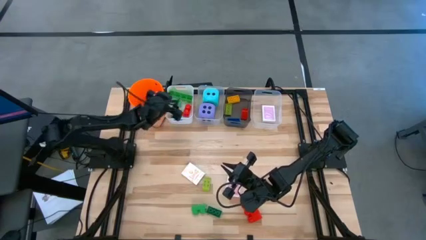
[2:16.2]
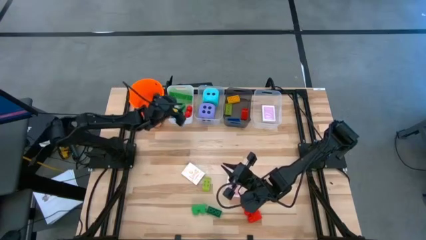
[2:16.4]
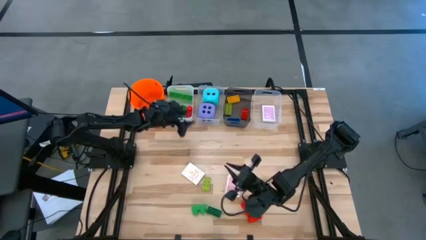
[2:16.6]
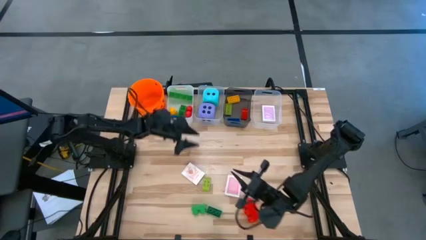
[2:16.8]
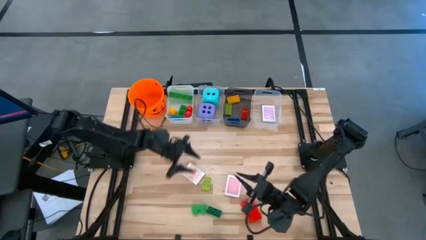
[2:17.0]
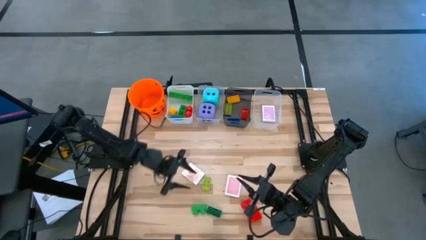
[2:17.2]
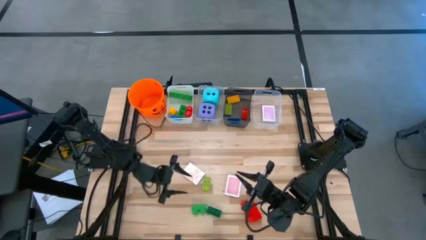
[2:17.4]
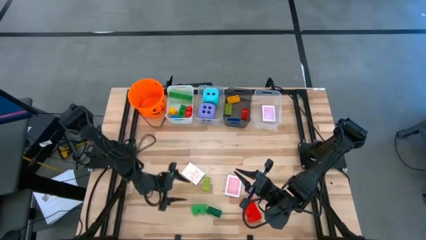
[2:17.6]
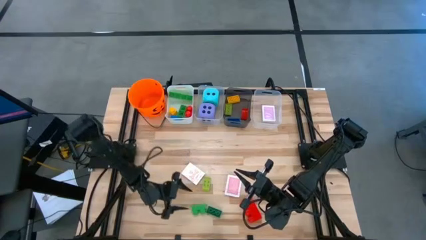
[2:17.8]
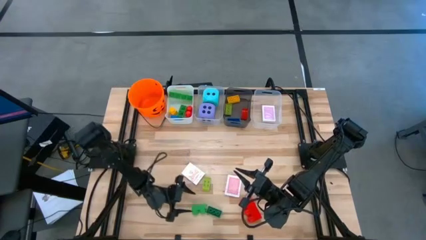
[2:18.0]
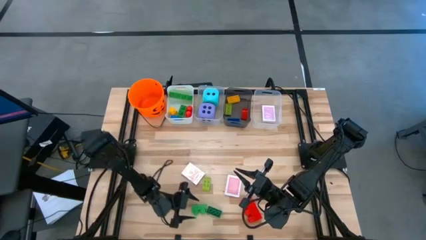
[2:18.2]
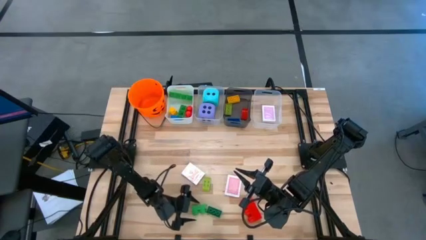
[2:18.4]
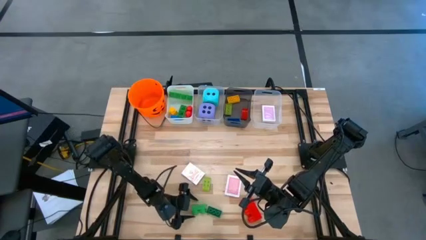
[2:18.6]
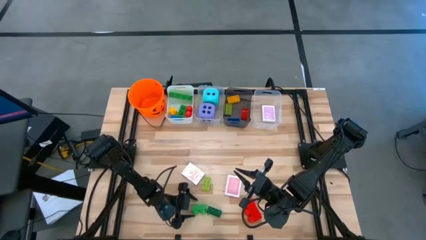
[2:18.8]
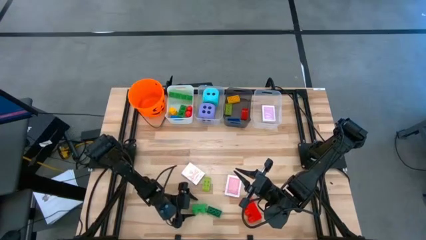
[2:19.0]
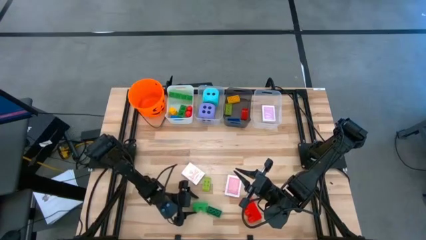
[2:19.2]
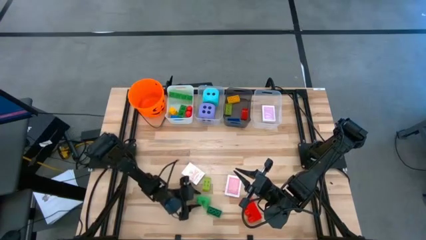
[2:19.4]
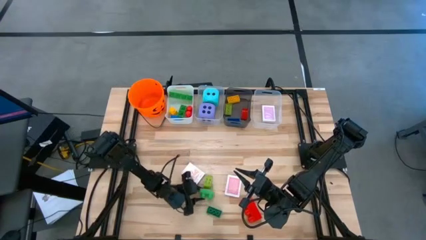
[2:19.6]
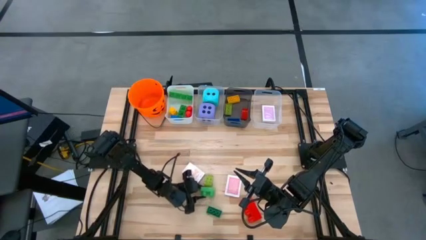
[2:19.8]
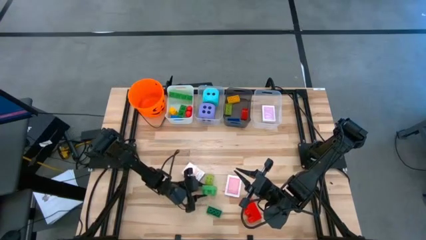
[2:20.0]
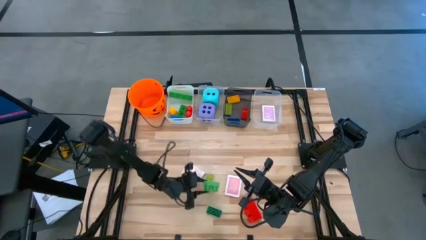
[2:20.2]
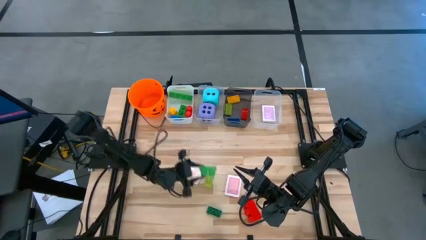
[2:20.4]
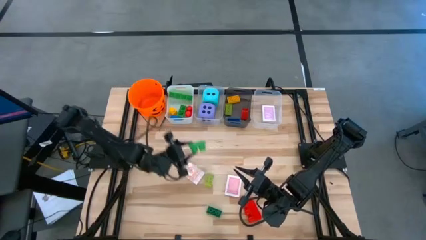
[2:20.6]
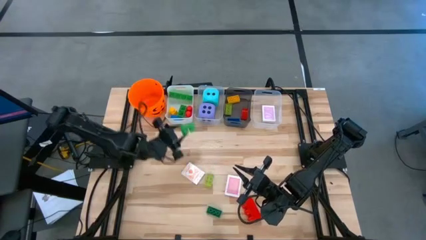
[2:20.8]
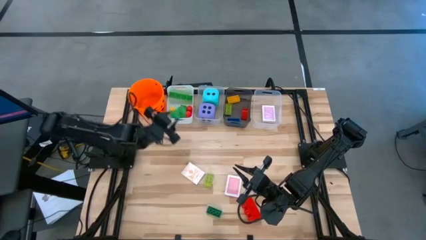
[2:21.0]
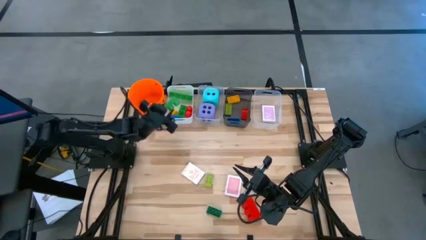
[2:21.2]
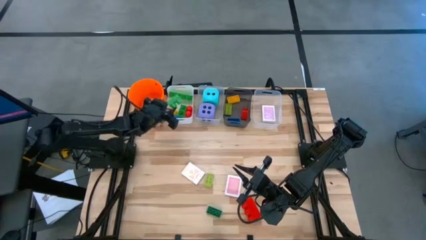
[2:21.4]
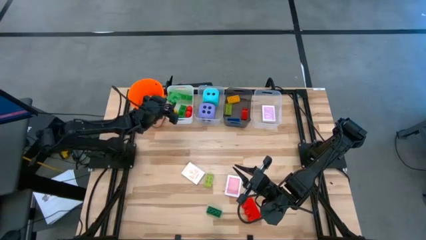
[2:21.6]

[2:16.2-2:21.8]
Task: Pick & Place Toys
Put the left green game piece into the white bin

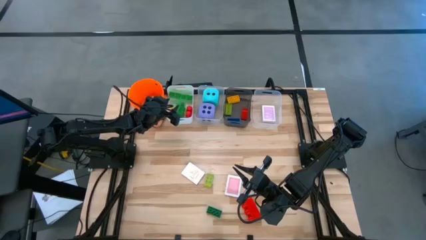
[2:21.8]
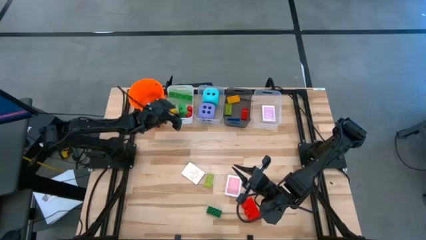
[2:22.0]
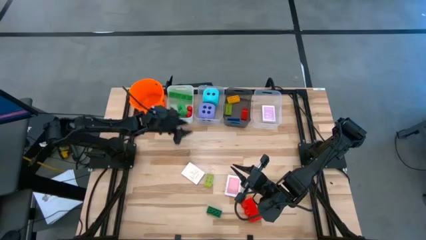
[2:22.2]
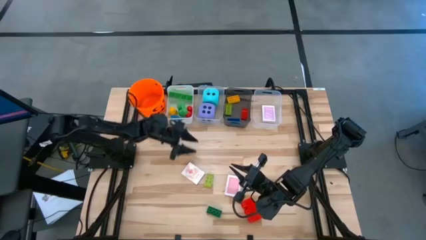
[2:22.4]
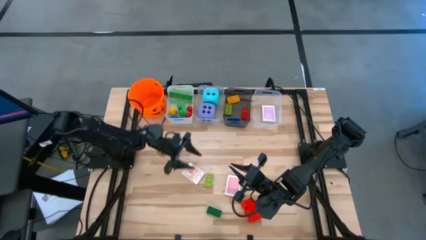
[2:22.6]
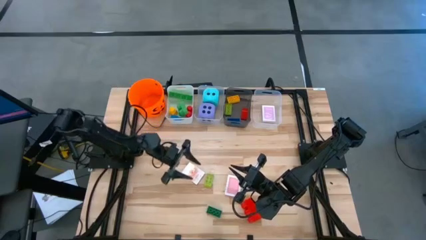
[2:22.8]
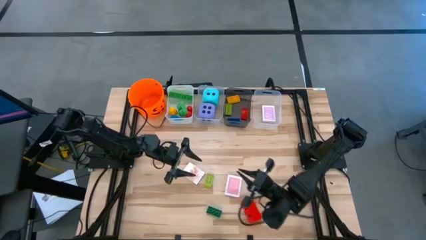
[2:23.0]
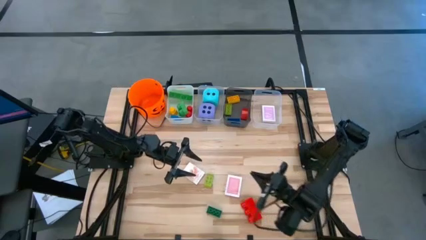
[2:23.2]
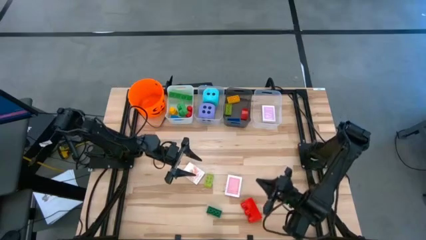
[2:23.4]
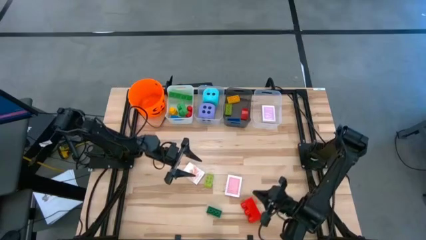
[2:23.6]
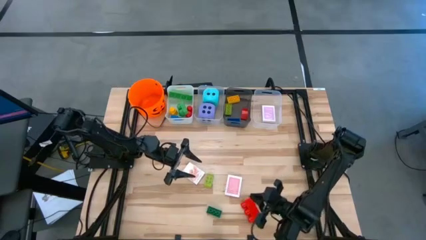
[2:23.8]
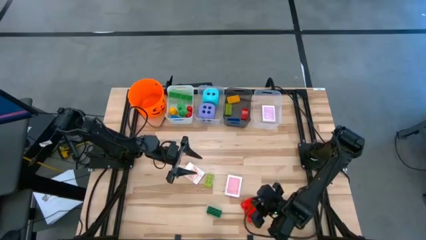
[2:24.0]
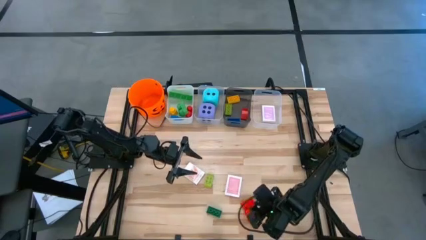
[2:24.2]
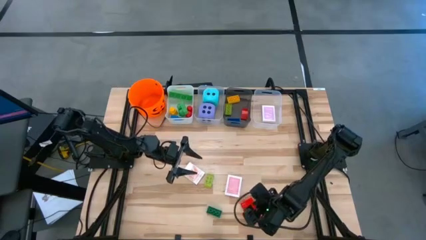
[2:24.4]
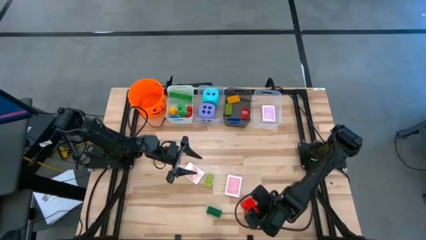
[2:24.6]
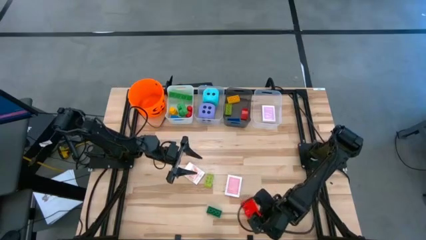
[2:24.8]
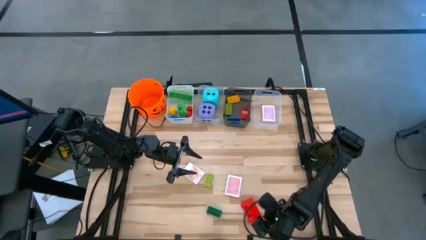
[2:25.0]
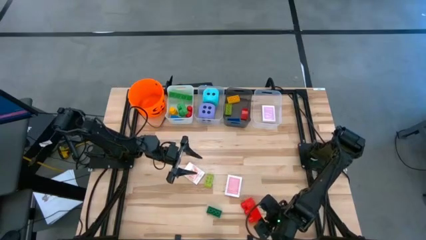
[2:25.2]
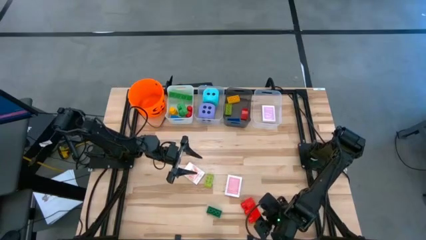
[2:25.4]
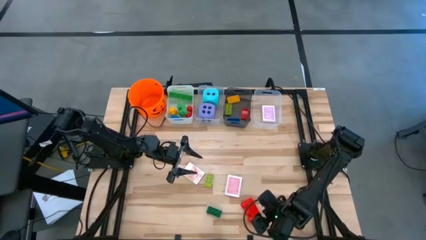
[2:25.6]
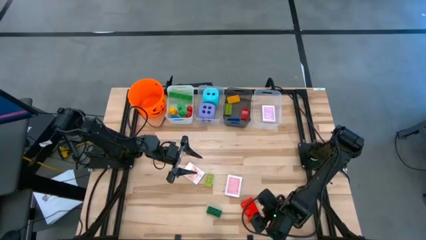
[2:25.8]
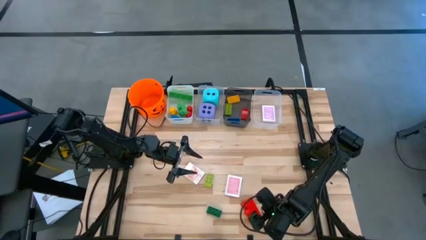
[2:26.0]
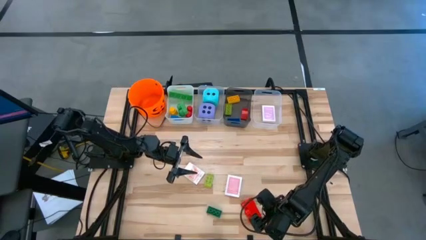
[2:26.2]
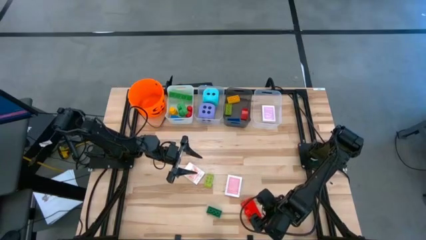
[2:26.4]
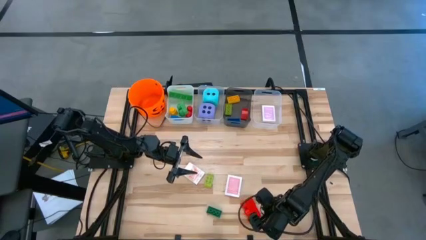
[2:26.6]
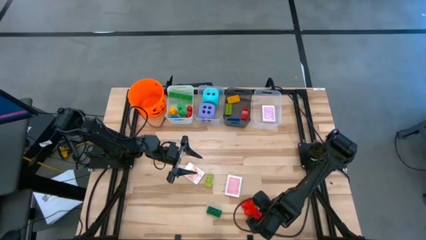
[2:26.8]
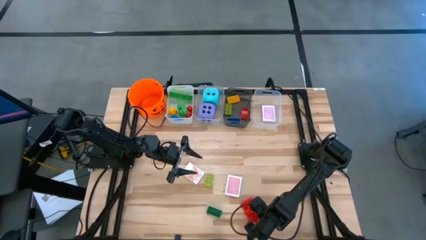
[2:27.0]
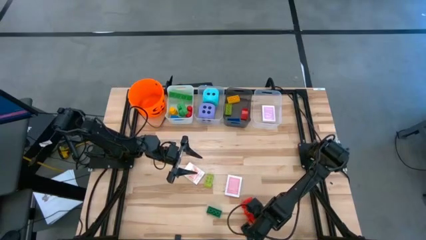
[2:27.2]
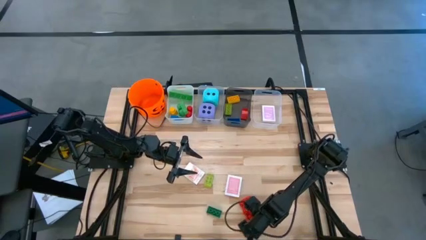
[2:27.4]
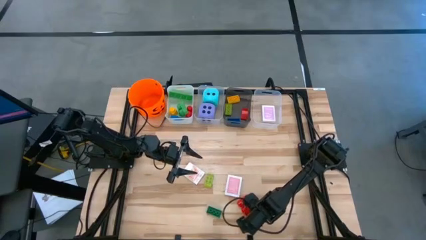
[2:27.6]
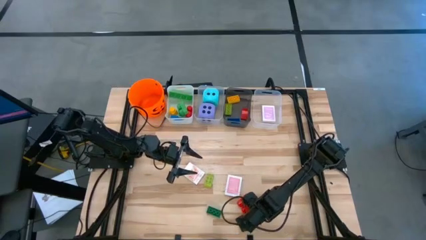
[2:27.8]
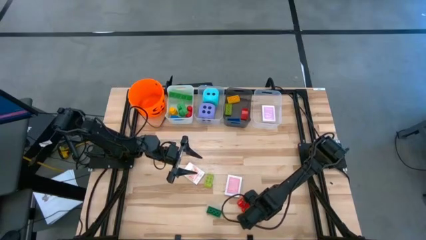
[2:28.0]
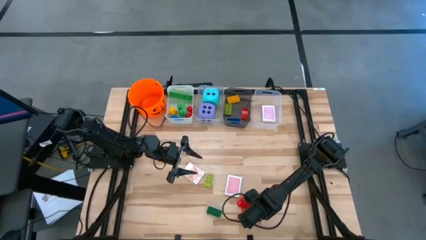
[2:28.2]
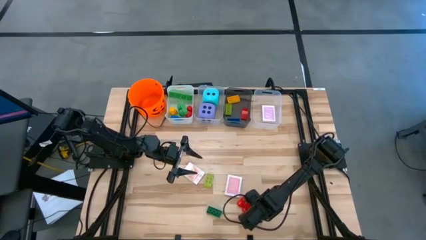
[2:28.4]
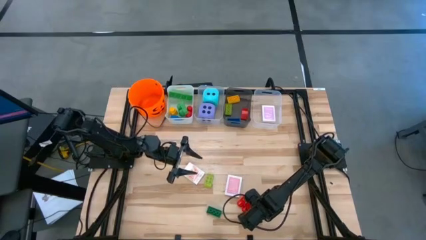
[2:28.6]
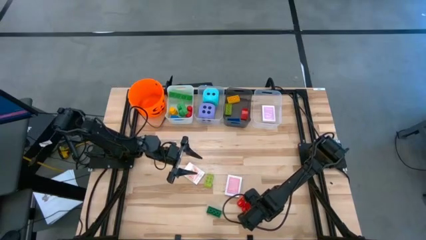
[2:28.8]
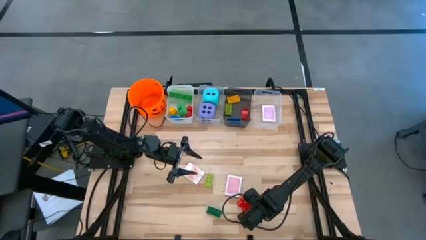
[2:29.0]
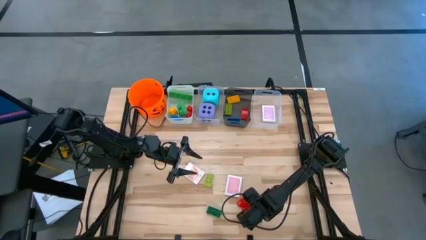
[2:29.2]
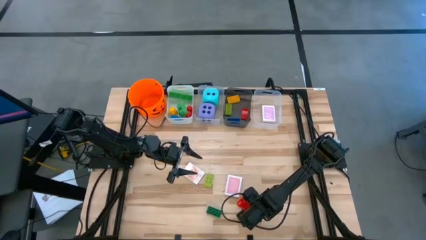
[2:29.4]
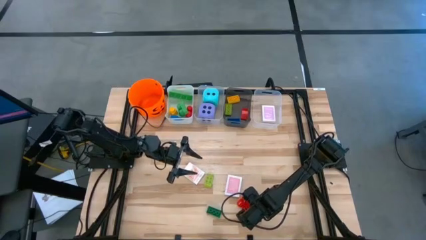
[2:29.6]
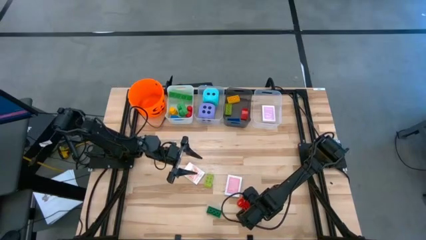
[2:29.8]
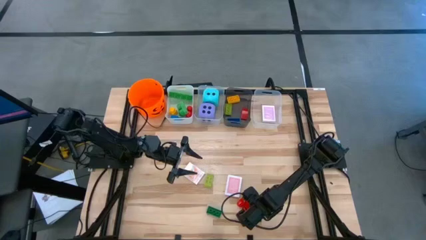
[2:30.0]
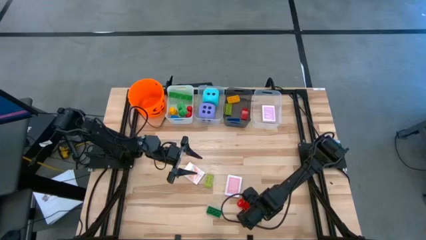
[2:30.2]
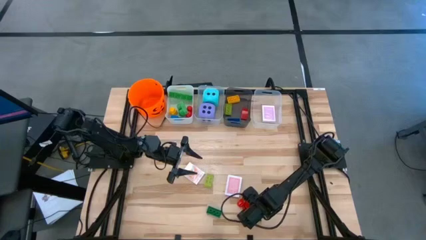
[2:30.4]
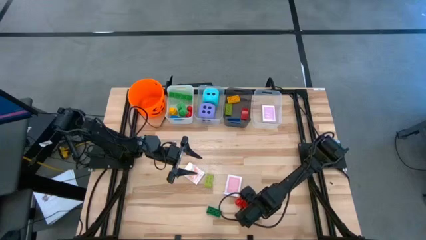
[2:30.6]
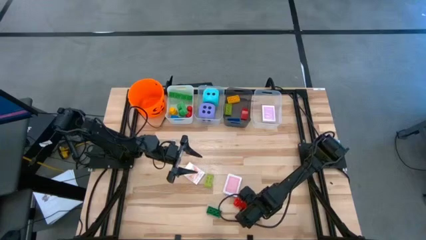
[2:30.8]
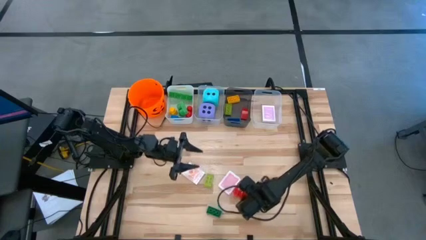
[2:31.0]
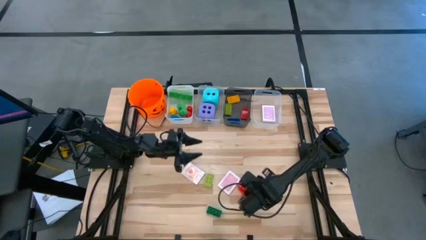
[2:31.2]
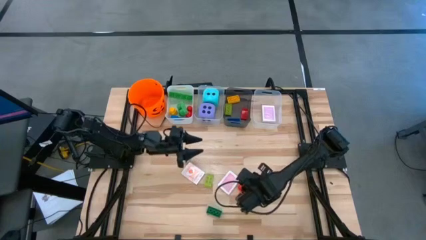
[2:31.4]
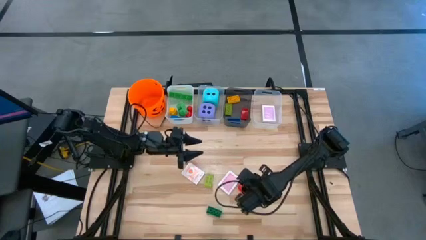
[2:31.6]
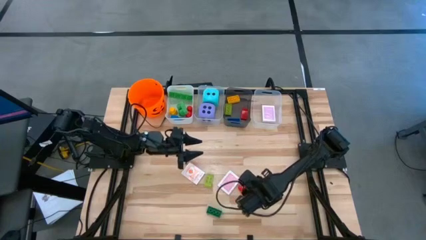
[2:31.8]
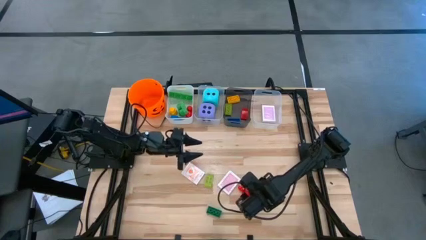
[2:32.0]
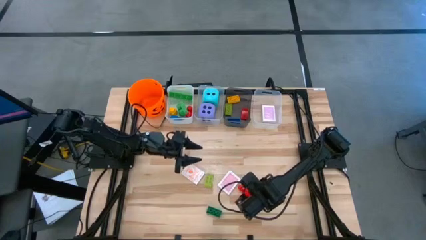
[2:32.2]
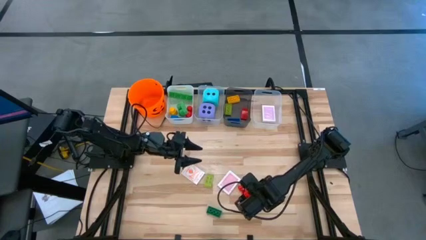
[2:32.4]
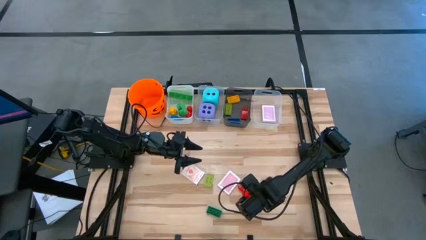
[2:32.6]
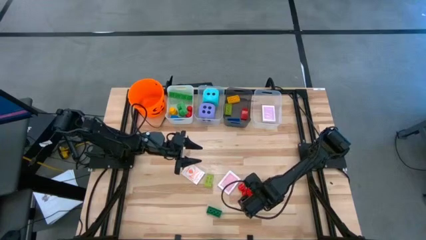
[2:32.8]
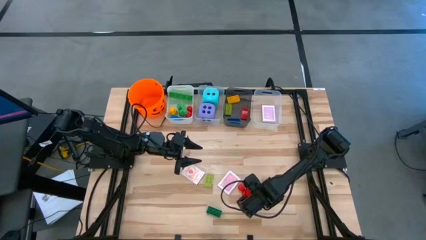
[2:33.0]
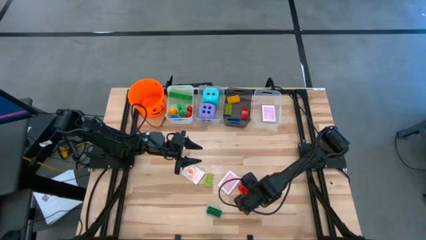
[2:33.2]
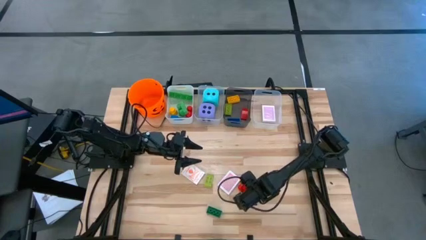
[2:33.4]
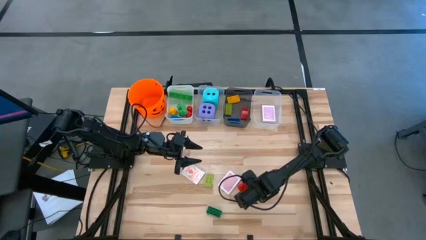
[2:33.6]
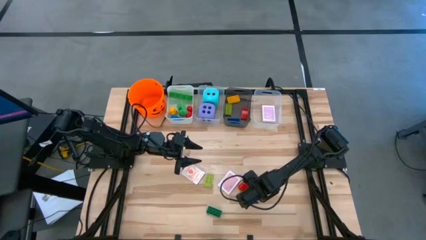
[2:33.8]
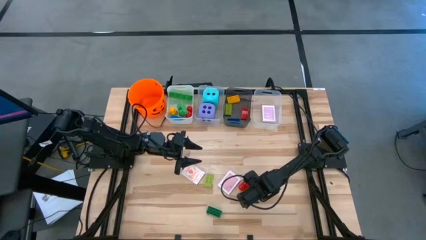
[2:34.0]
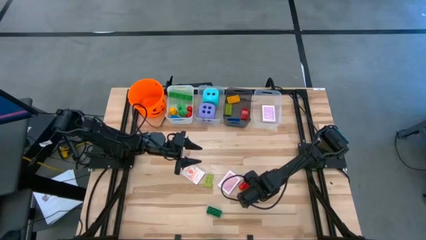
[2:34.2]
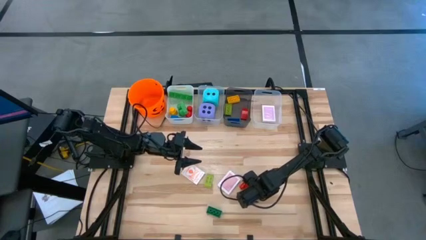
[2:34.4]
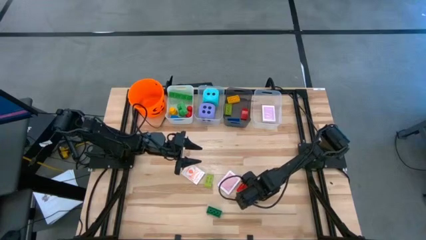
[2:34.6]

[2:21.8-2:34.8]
Put the red game piece into the white bin
